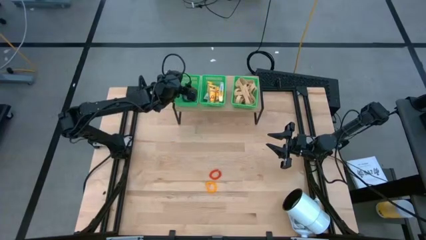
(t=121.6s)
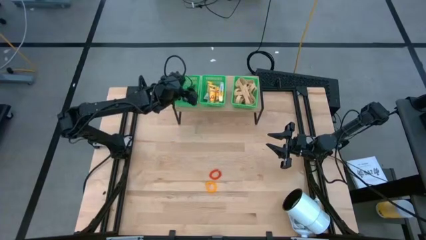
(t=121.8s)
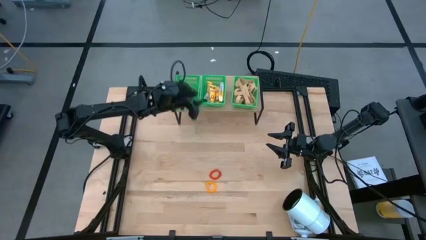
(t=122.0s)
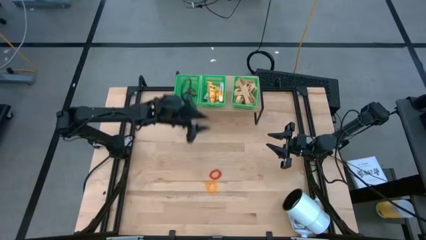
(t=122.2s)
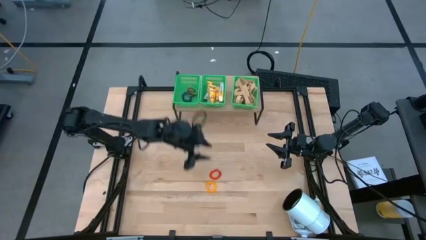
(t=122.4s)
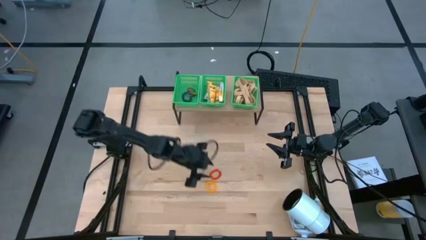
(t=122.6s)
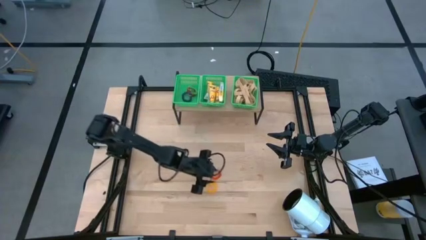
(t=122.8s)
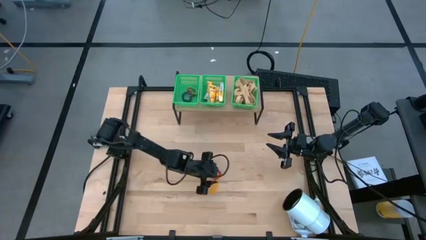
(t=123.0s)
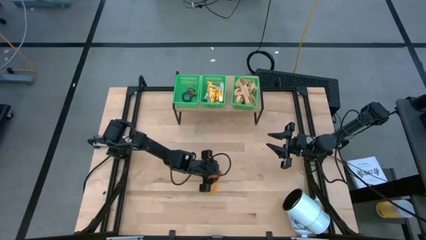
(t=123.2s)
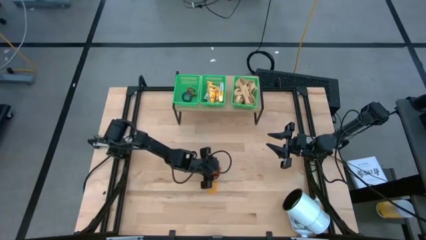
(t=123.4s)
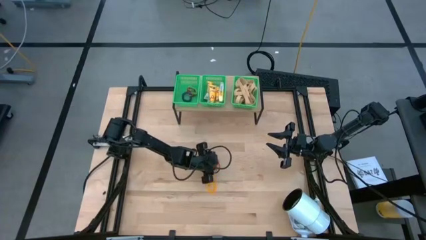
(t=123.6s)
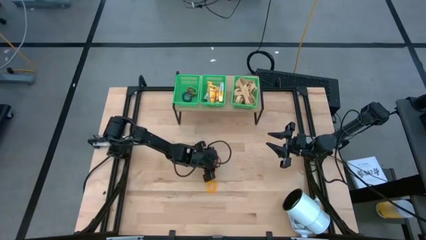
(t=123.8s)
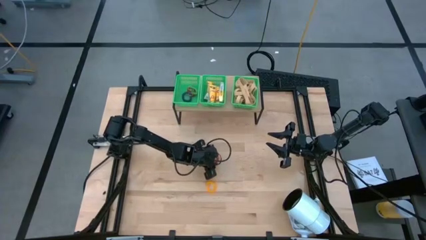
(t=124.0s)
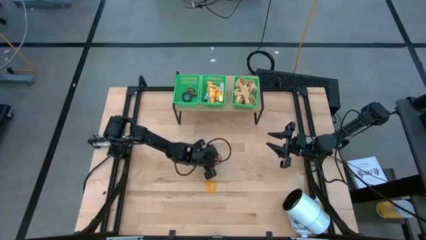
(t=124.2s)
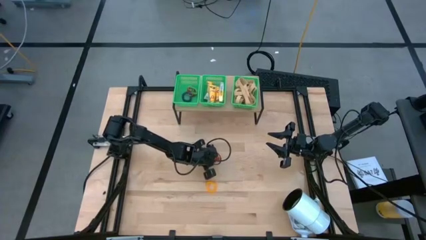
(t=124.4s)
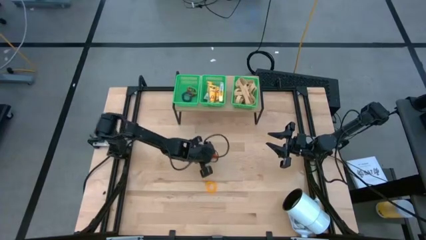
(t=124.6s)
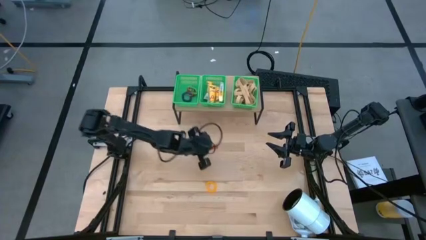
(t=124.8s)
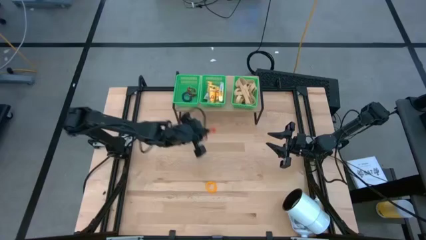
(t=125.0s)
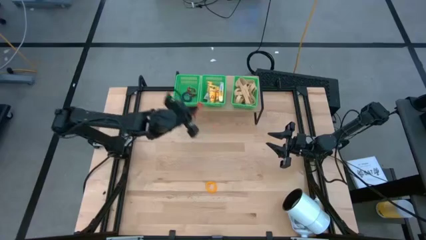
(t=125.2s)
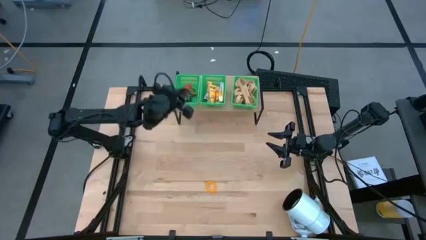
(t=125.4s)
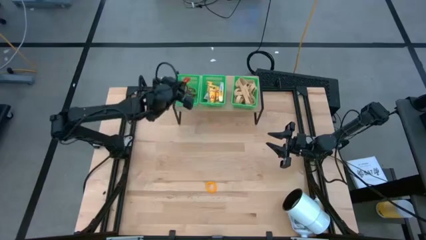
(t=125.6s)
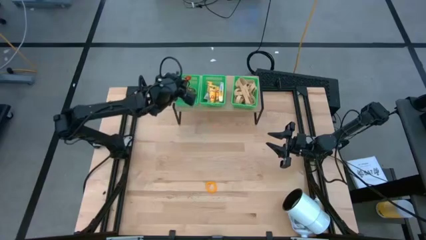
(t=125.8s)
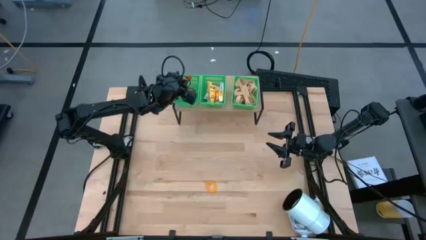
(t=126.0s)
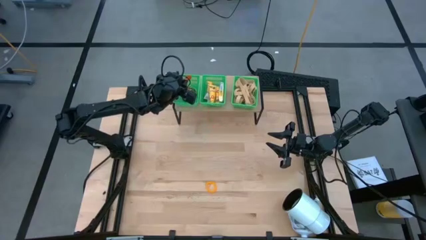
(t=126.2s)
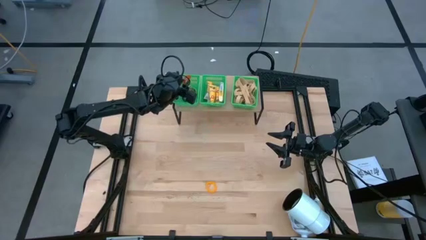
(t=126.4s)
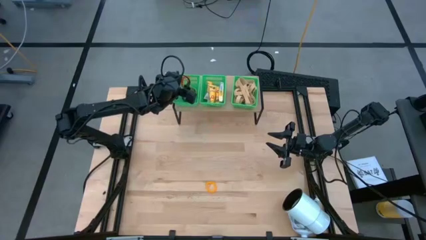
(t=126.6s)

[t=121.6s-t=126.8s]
Task: Pick & Place Office Desk Supplies
Put the orange spring keychain into the left green bin on the shelf

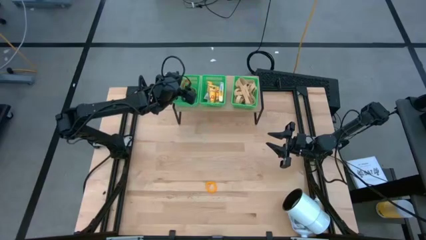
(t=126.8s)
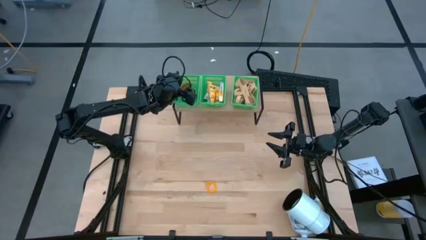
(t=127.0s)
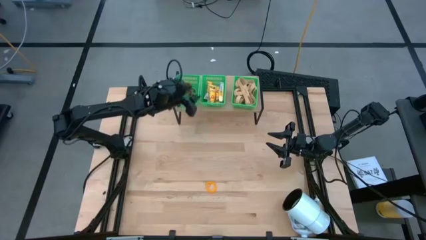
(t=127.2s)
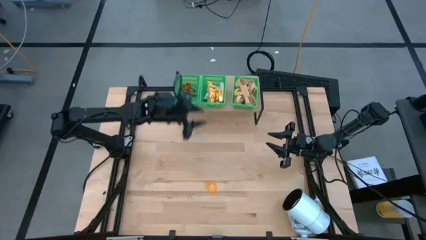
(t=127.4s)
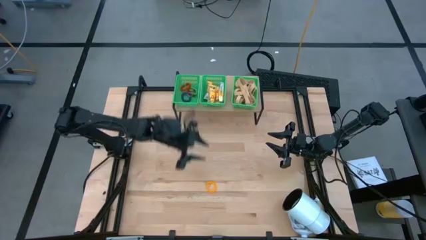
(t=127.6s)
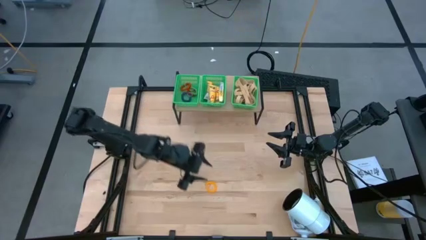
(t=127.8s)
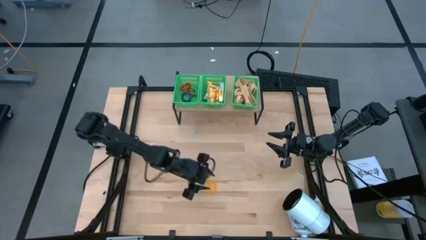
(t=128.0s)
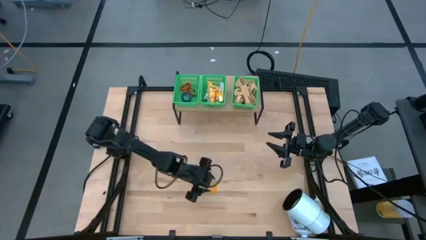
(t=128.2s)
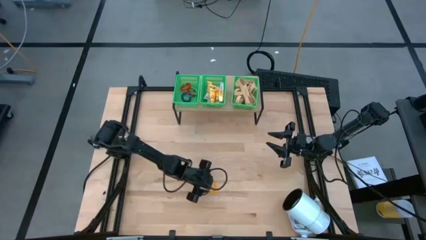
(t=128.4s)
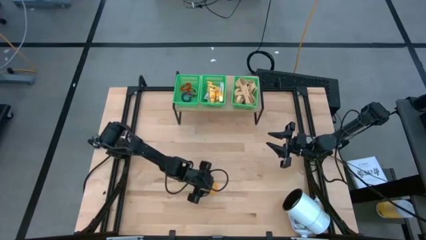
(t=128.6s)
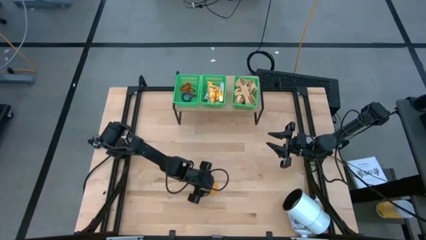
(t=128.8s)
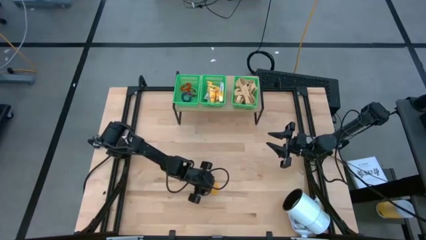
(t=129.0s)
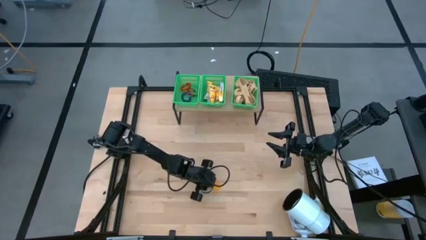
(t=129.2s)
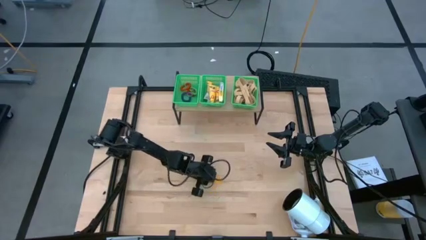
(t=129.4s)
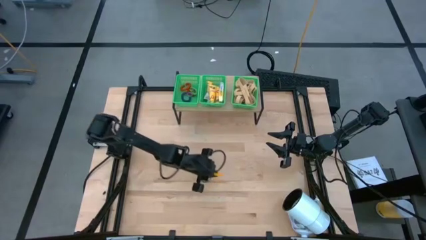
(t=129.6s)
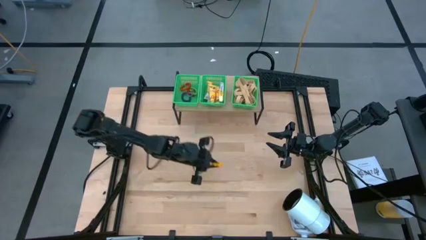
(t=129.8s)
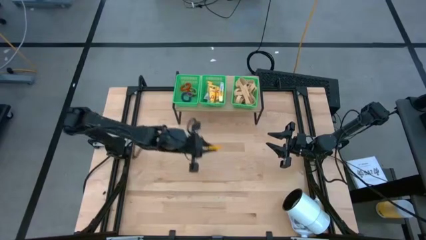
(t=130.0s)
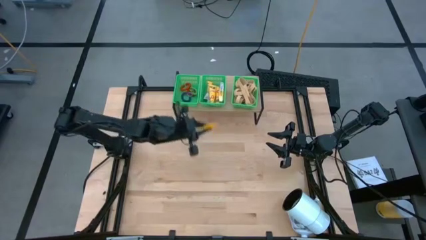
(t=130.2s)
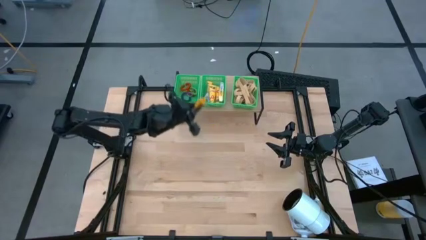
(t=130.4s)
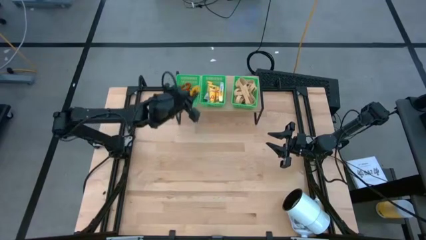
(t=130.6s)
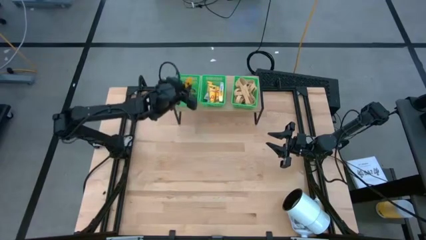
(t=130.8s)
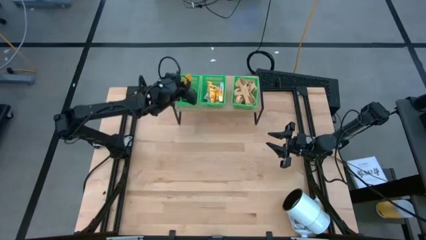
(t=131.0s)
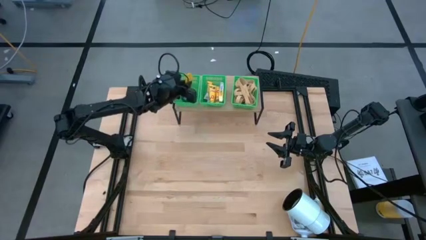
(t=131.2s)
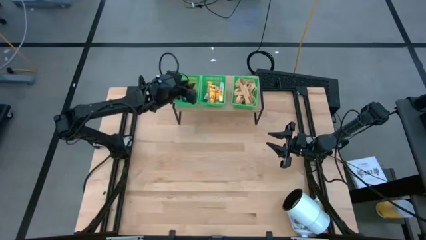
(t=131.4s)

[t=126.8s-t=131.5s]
Put the yellow spring keychain into the left green bin on the shelf

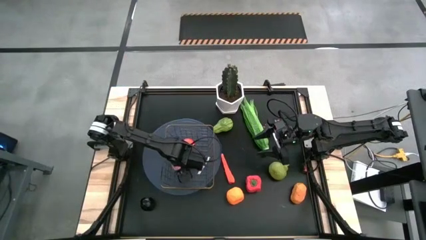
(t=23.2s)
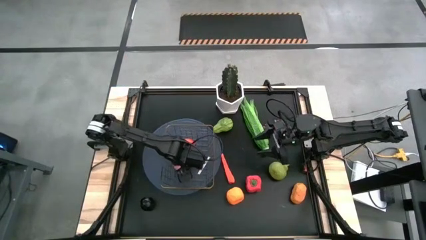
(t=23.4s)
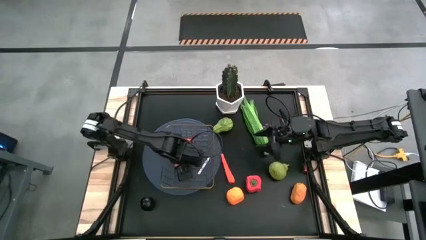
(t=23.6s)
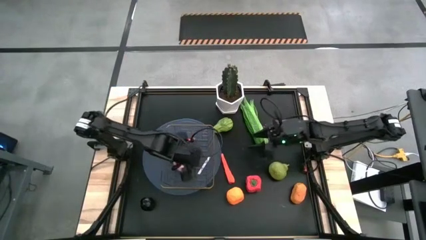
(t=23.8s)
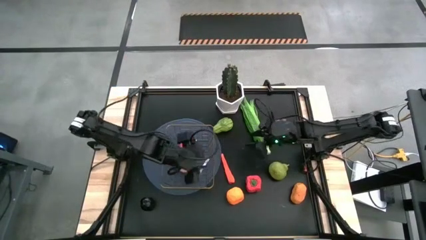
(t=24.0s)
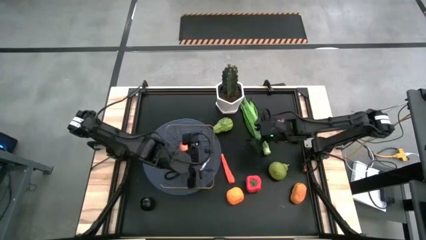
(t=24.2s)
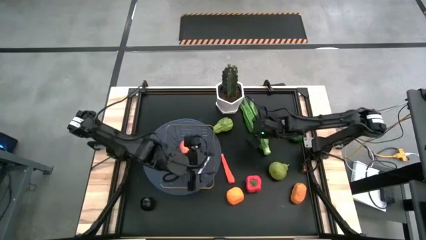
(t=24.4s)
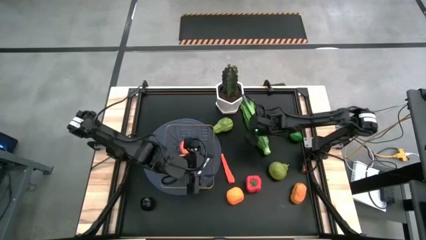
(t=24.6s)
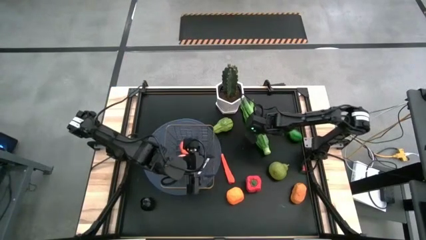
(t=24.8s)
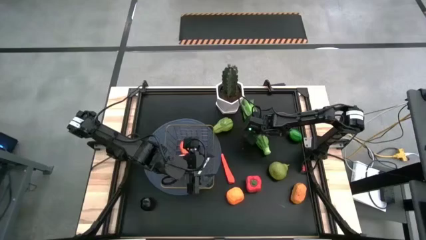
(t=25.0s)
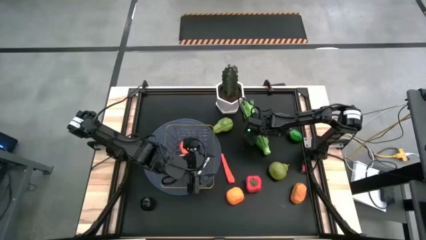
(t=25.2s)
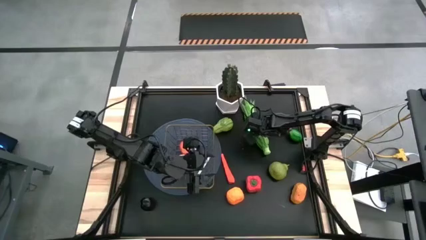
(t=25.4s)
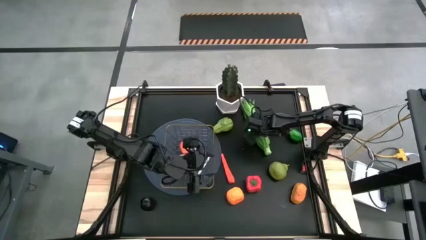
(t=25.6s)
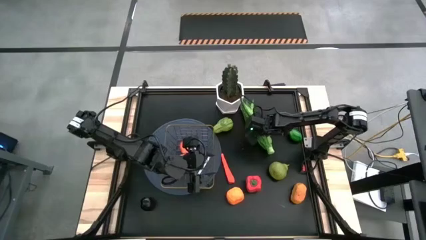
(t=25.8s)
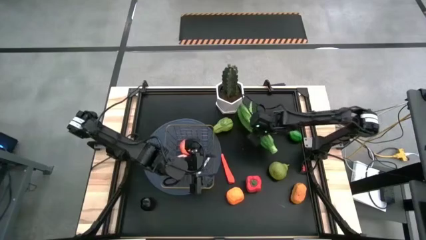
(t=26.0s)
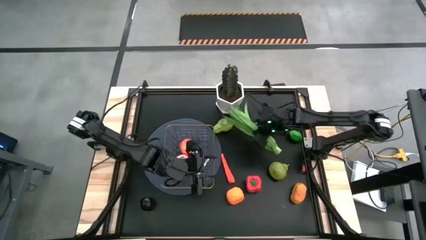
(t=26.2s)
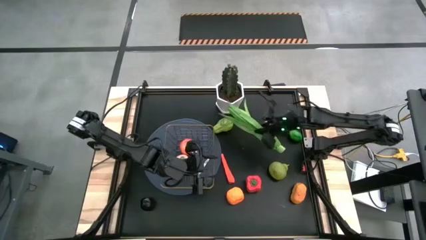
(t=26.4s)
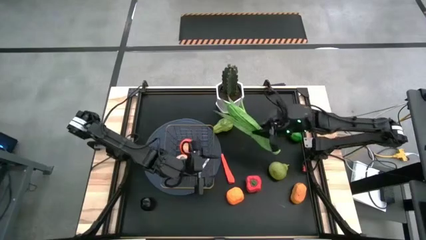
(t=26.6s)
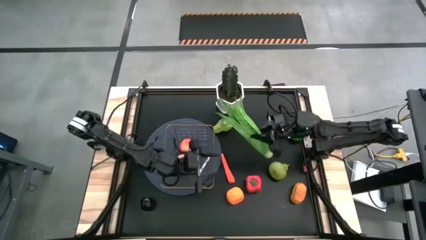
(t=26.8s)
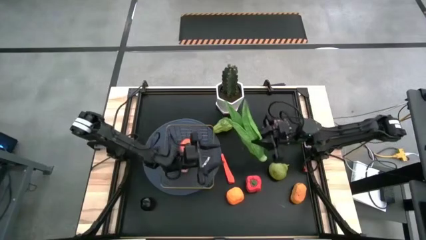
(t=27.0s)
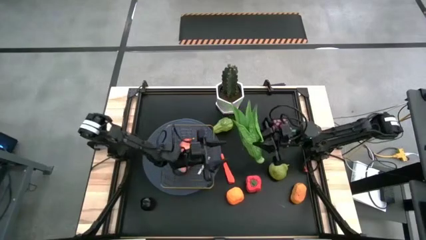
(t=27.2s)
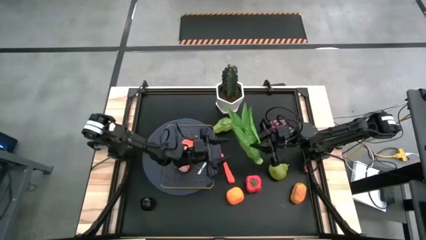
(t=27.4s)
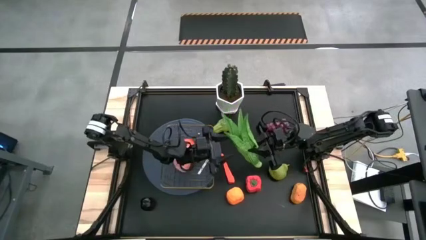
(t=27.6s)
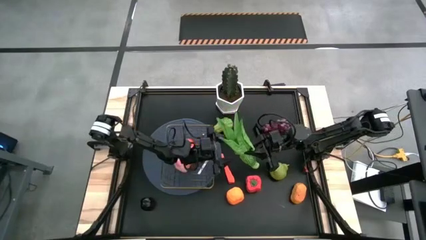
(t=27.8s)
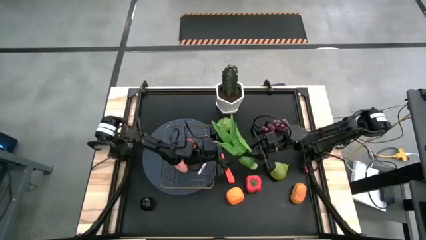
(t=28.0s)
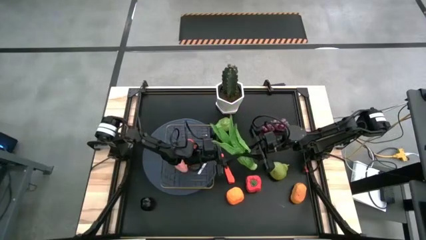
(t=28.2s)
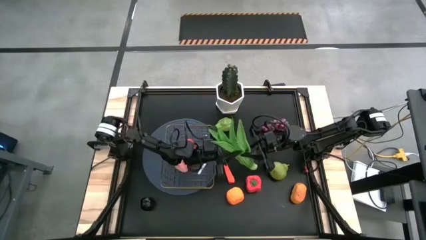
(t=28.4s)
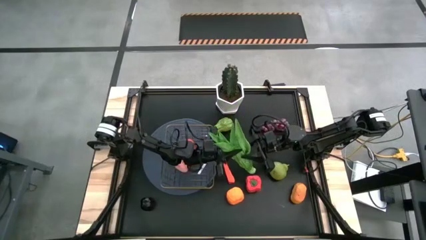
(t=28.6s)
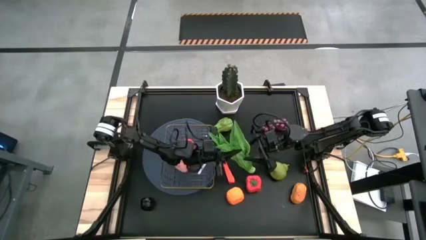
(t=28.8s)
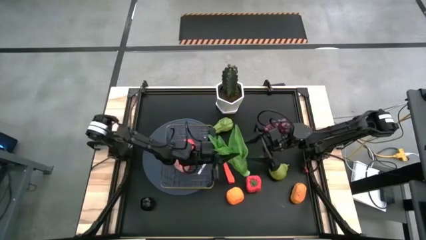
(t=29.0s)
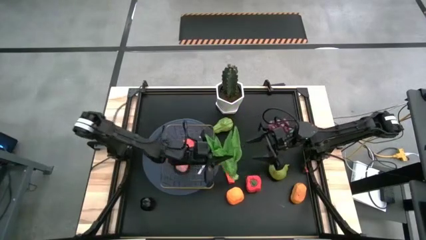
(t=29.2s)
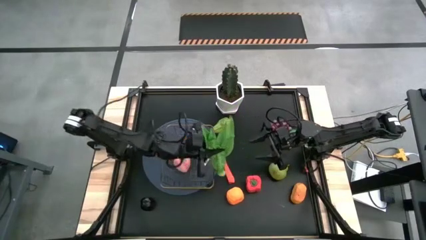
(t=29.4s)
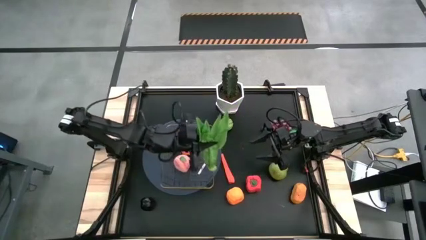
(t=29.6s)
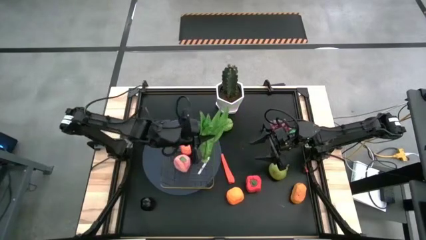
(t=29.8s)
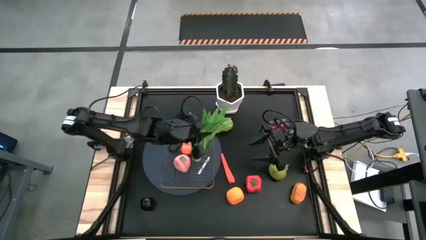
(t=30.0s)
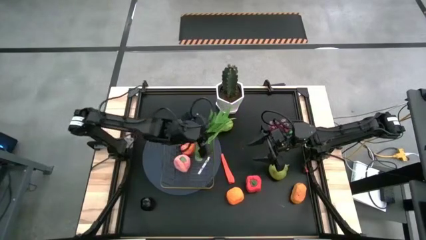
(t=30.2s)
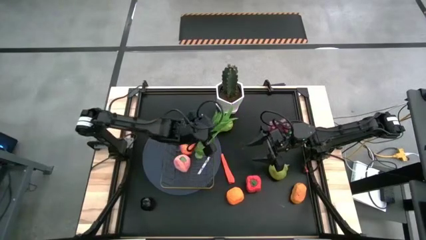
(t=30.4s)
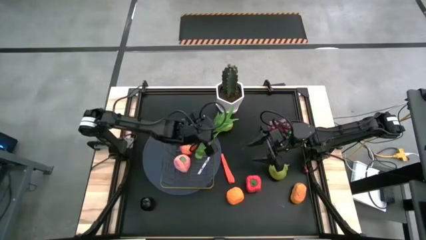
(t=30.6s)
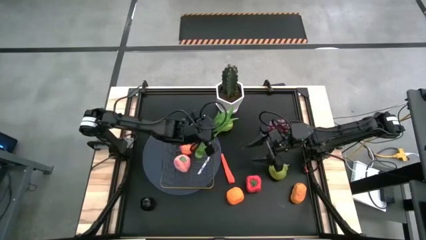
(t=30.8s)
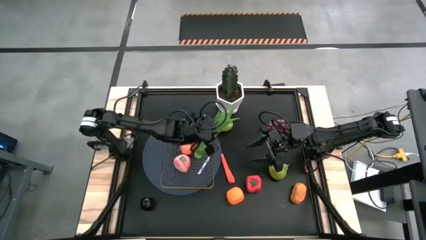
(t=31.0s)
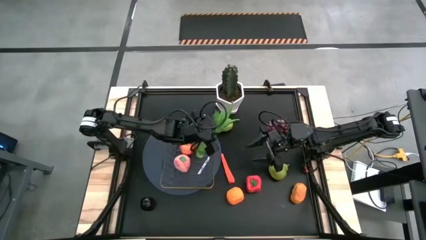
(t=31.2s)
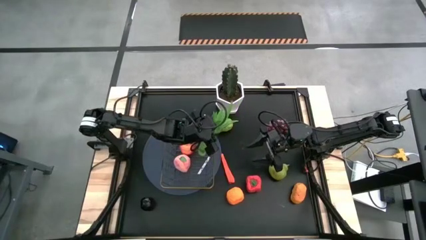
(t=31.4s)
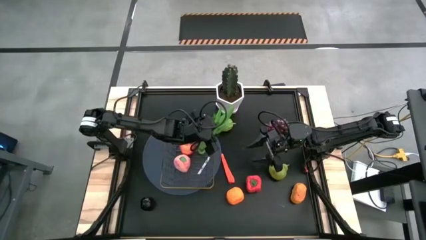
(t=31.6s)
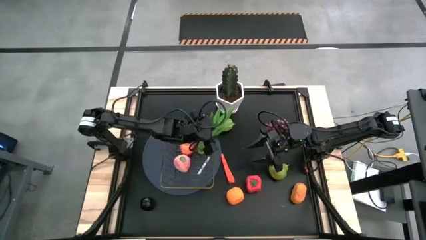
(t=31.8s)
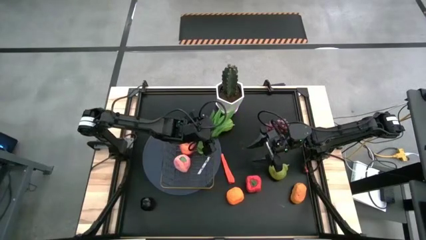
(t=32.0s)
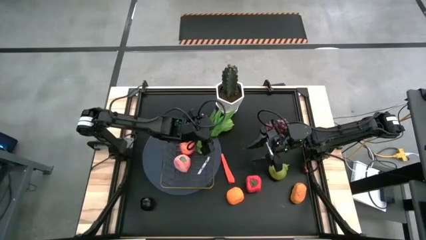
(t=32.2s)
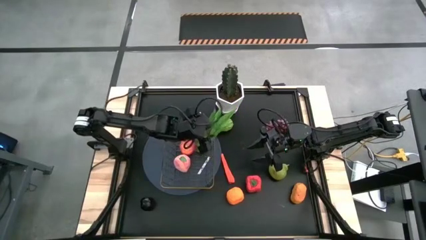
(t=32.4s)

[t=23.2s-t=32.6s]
Task: Build produce basket
Put the green leaf lettuce into the wire basket
